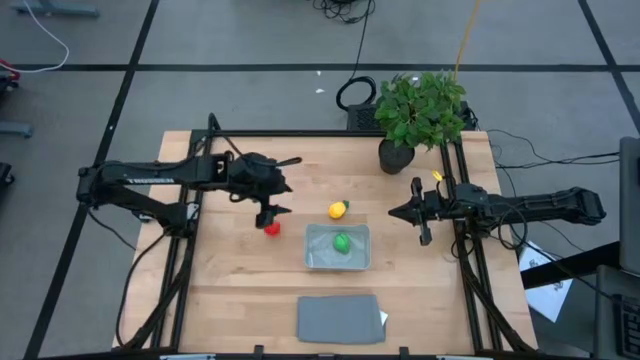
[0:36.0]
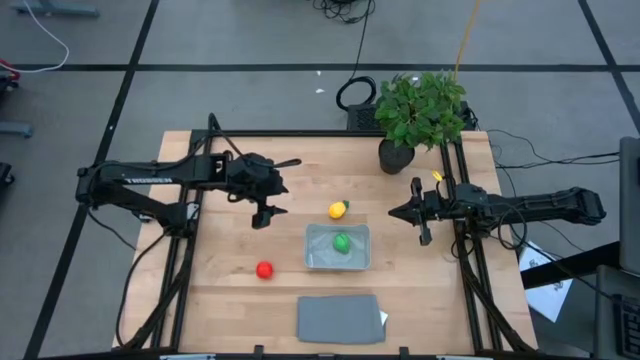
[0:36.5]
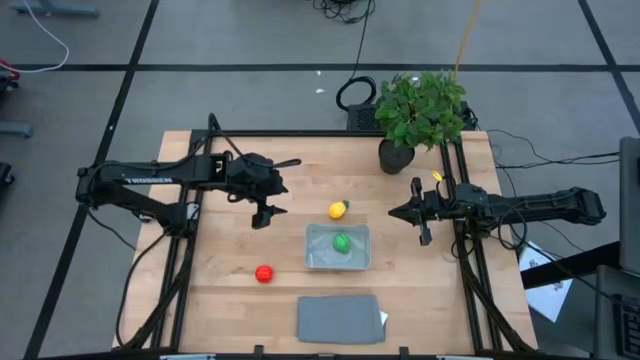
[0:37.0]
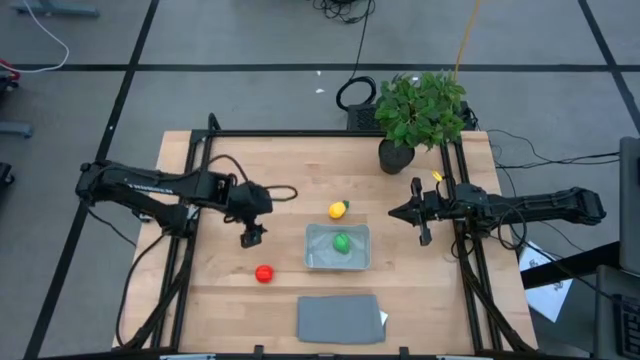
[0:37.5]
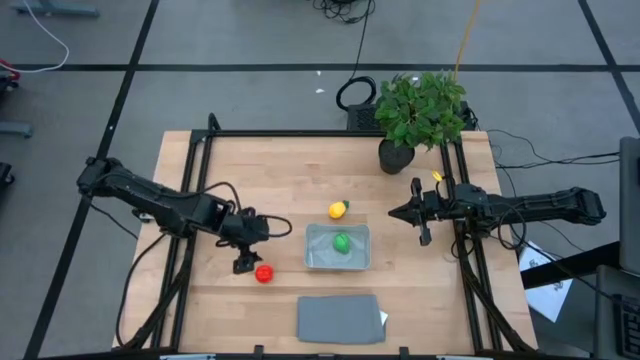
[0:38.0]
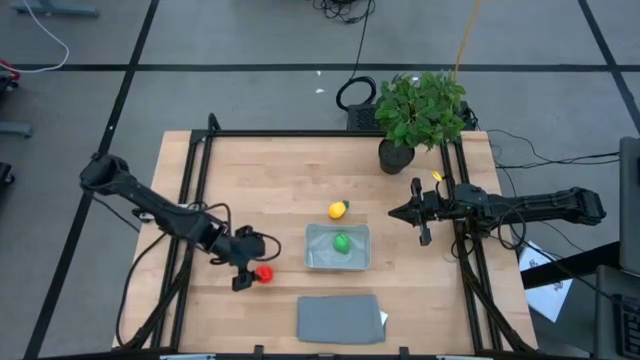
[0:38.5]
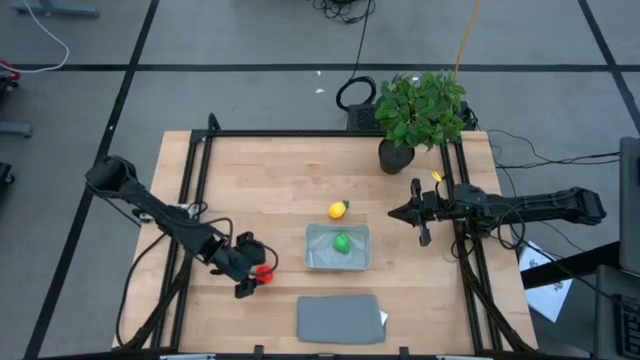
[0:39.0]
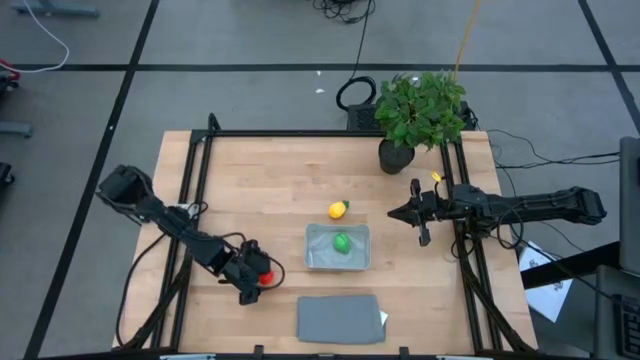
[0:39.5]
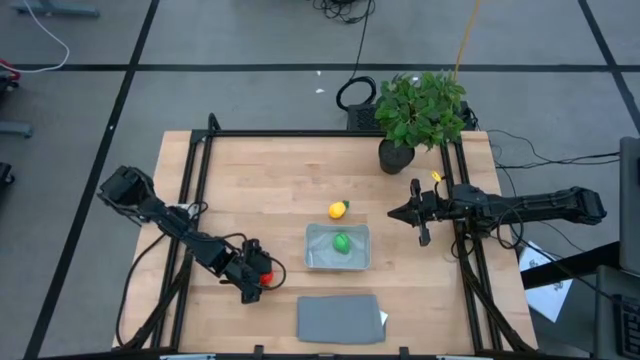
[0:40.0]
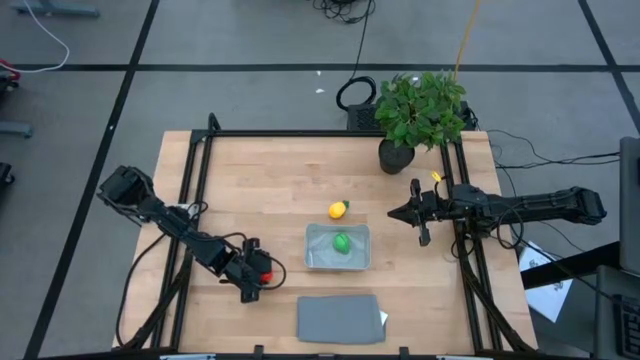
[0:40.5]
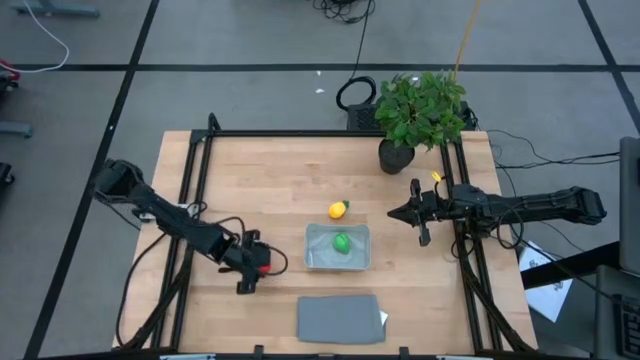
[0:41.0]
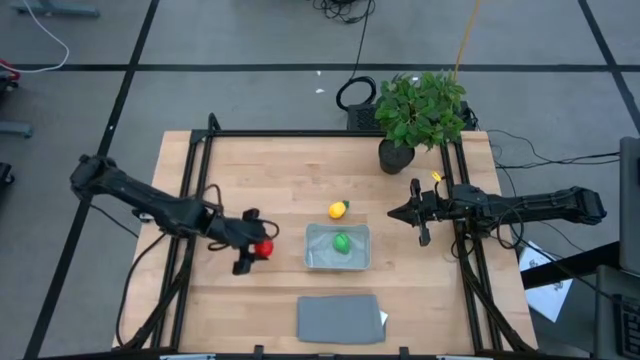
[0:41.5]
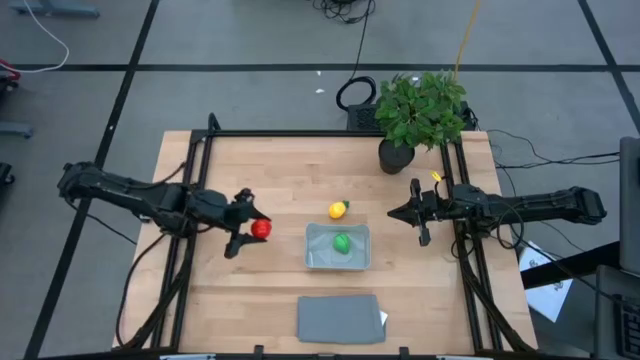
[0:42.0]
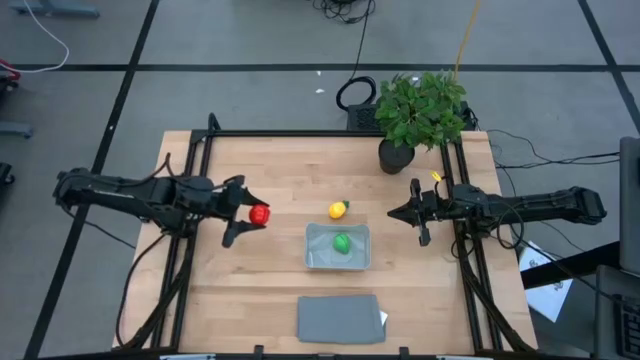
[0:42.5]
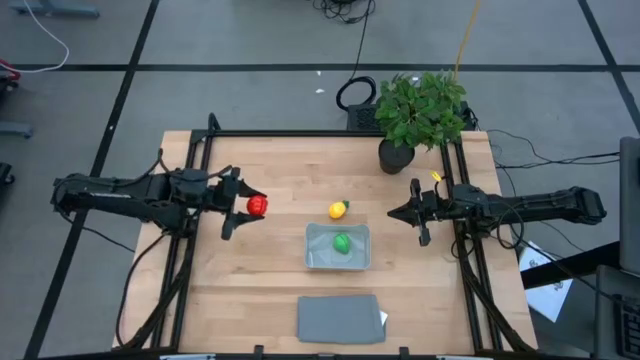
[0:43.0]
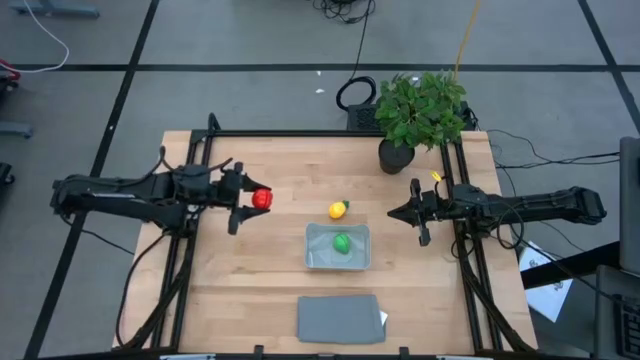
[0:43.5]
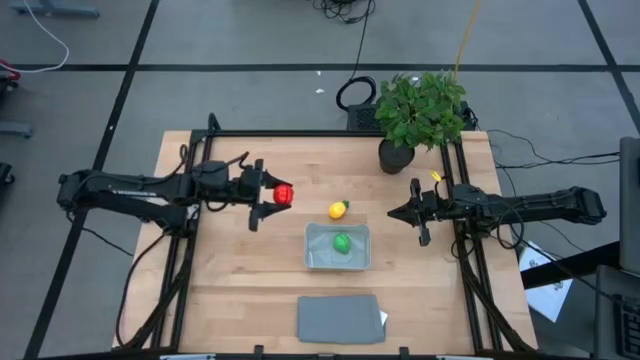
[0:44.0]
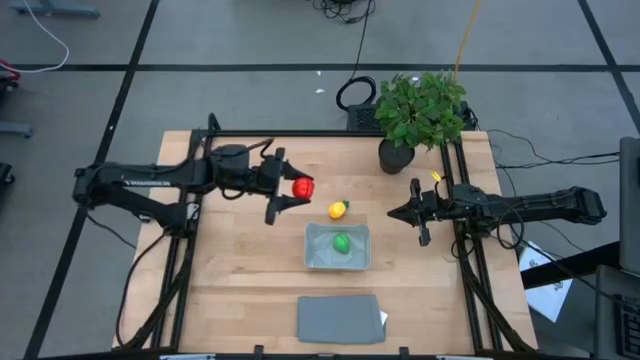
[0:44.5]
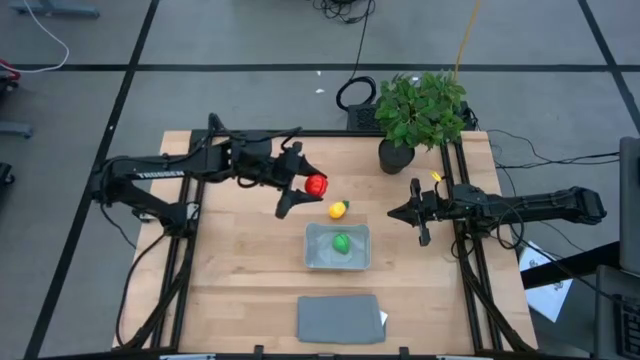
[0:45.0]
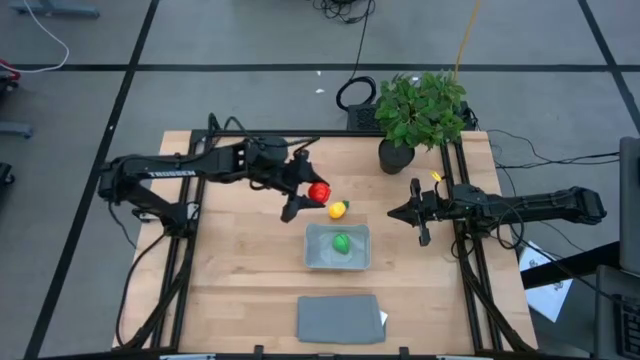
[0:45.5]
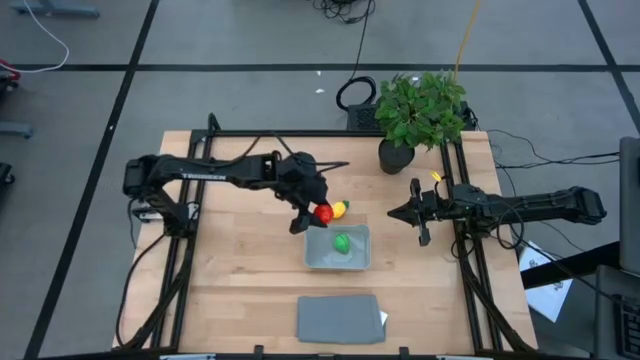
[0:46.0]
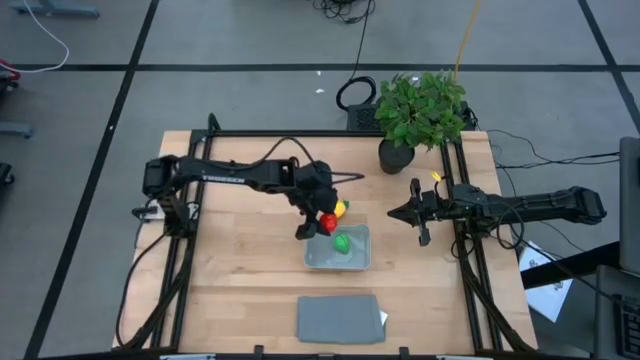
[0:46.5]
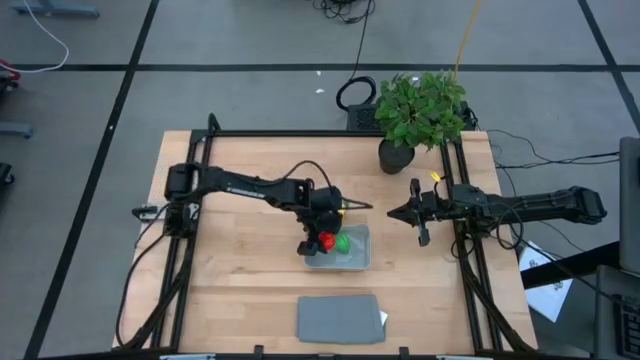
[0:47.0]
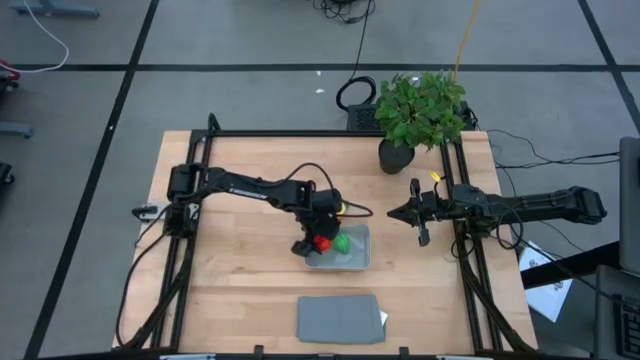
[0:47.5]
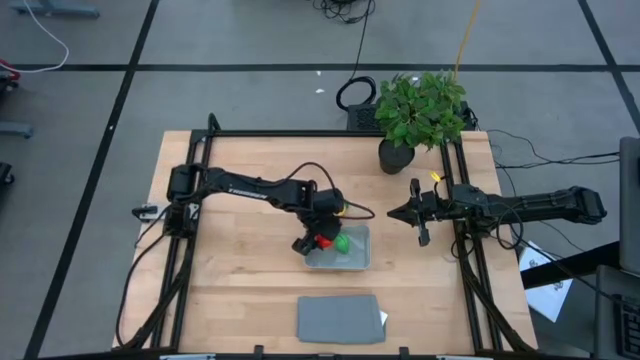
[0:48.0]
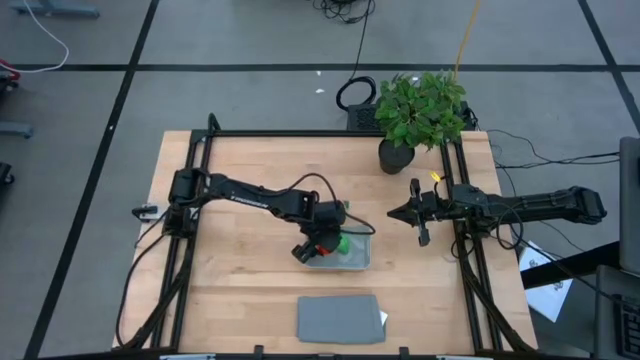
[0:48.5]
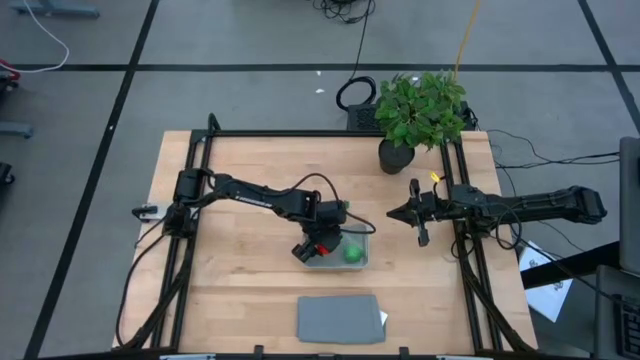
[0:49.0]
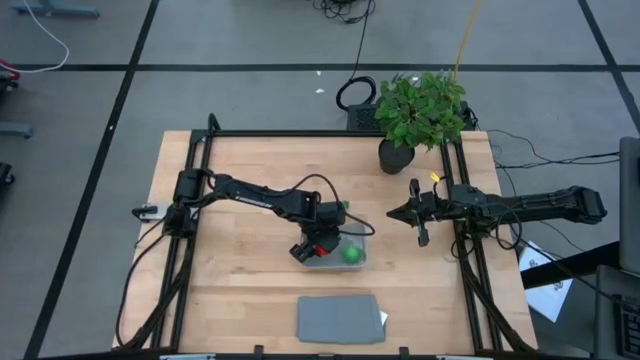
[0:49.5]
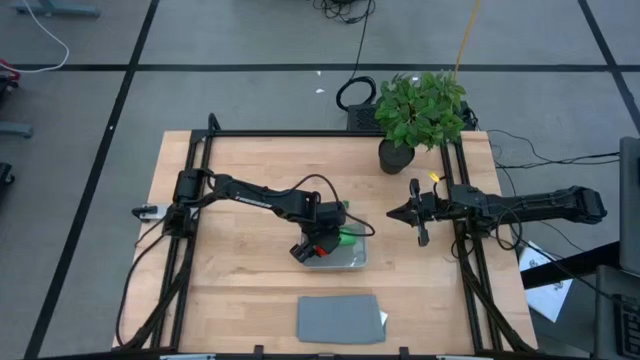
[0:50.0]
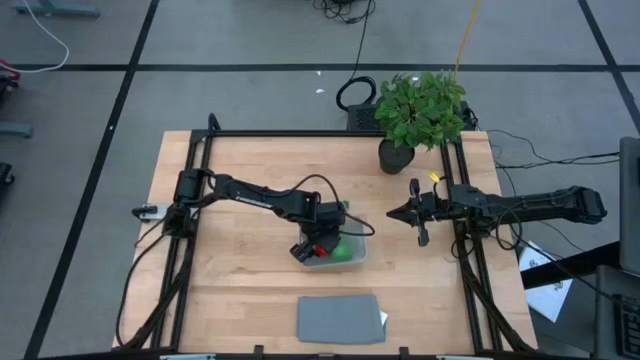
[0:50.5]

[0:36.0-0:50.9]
Task: Pick and placing Produce into tupperware
Put the tomato into the gray bin

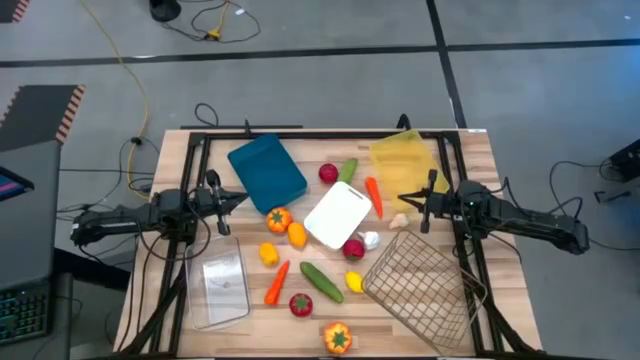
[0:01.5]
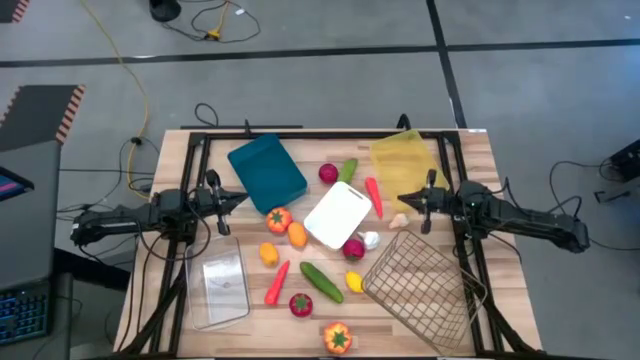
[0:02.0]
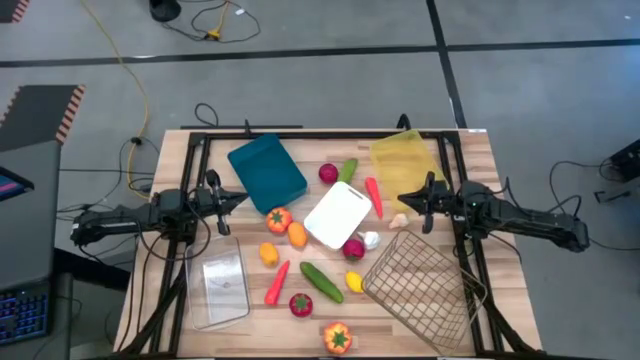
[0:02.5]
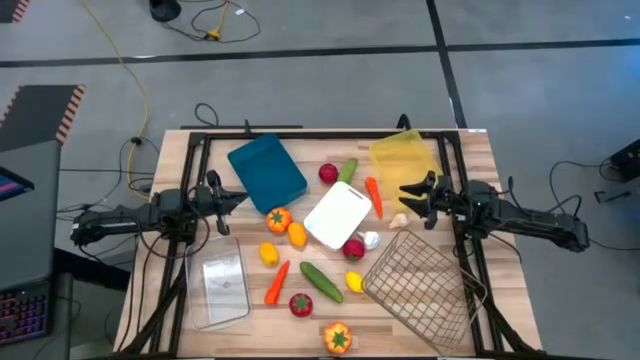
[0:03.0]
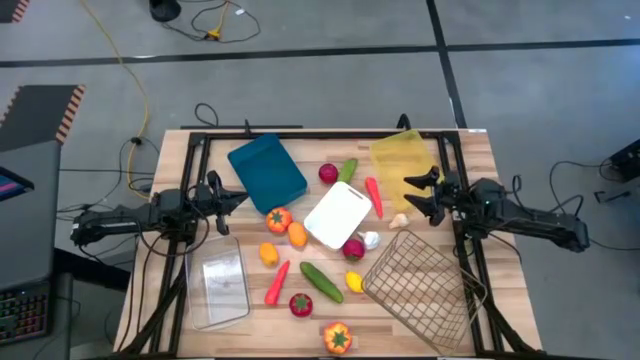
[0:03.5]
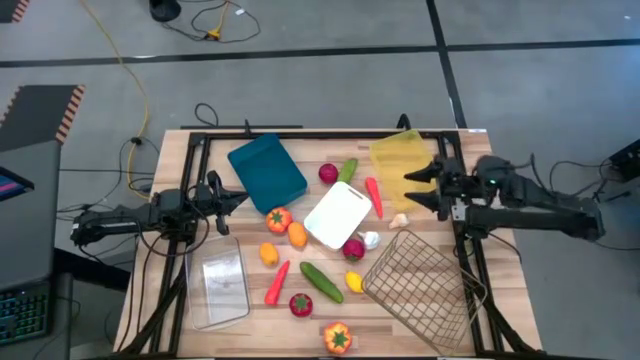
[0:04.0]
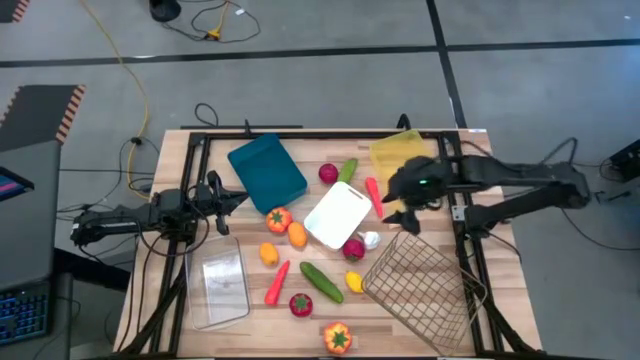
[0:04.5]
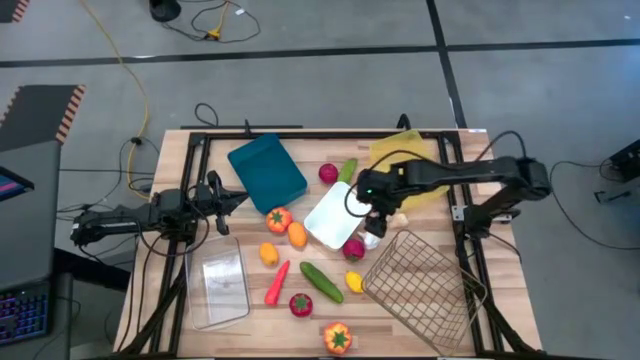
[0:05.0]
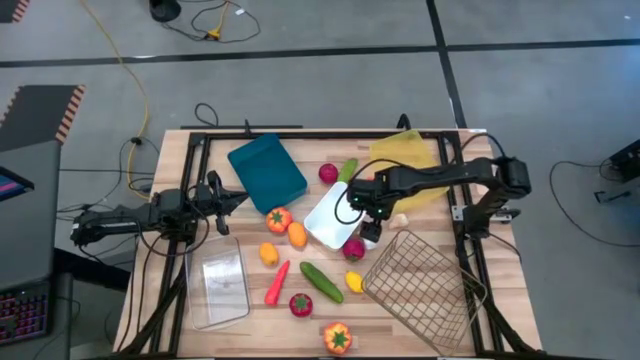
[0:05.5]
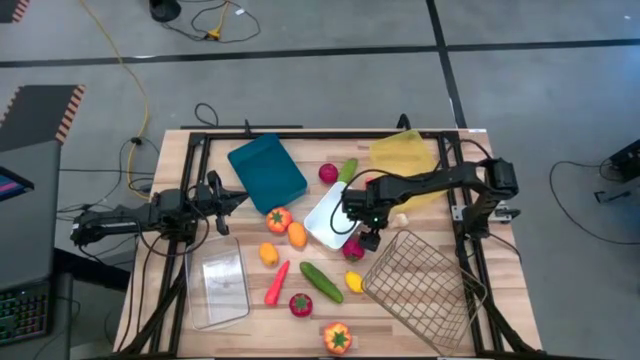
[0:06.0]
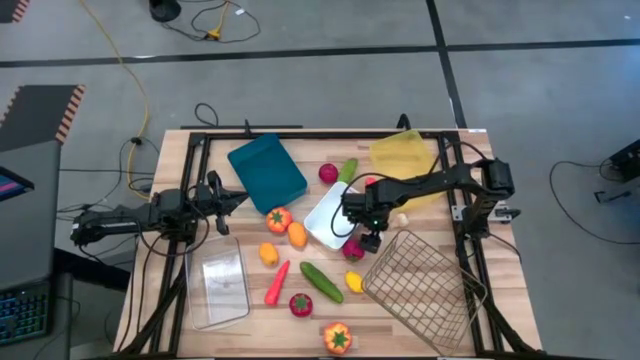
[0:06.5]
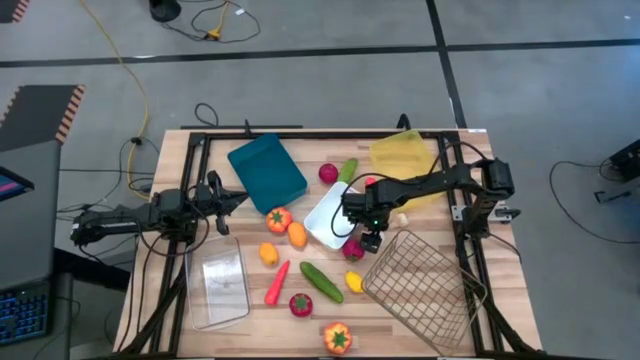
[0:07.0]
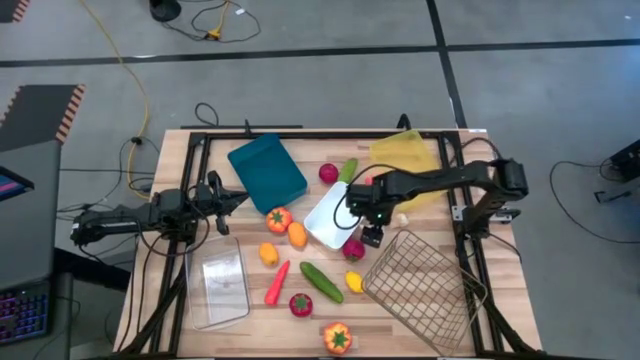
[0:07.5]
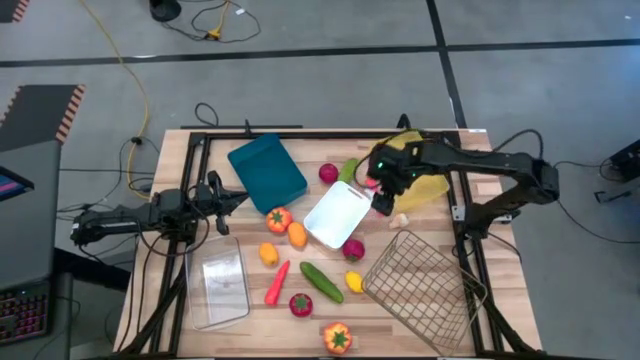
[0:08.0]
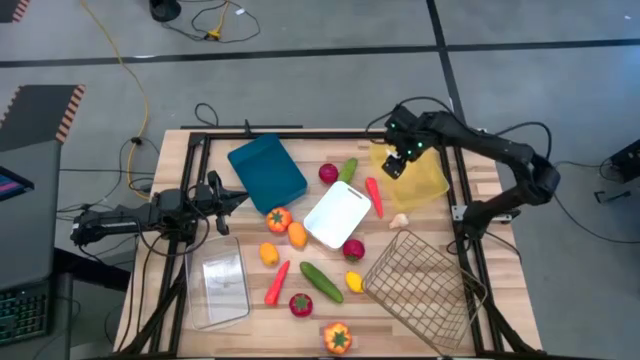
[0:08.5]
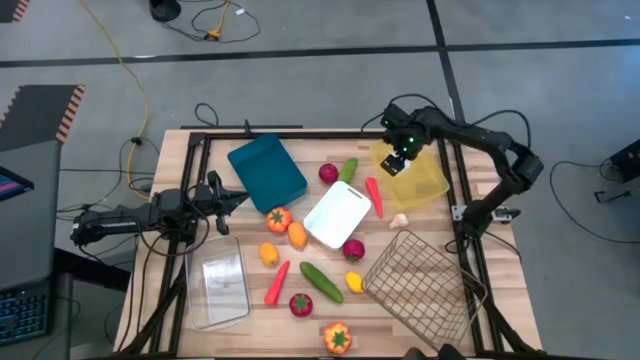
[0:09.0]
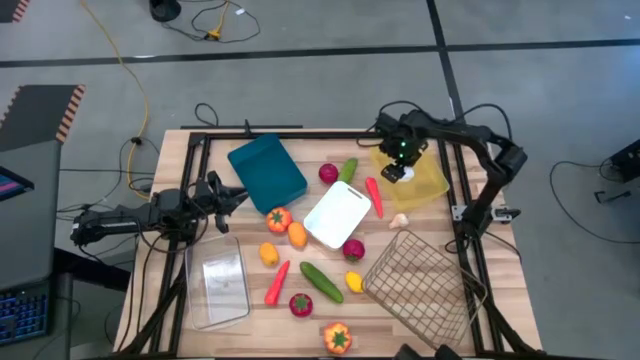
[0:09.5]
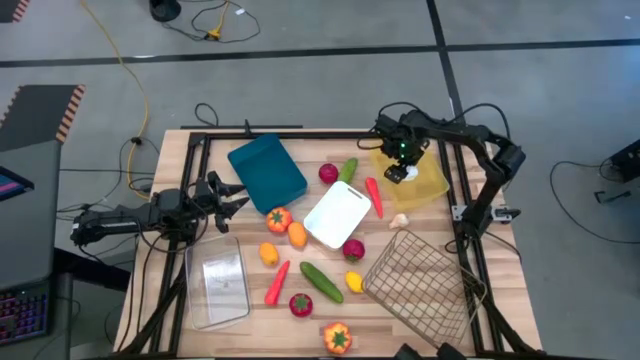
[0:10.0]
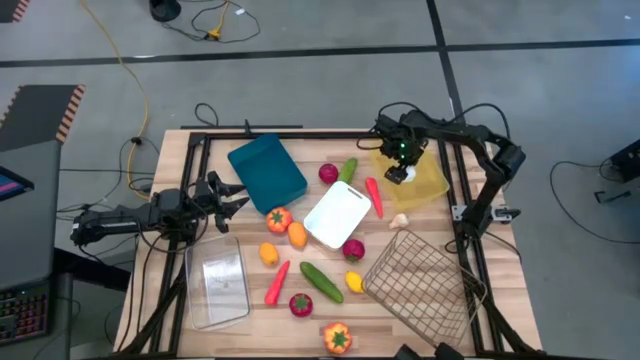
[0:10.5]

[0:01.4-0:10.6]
Task: Sort produce into baskets
Put the left white garlic into the yellow bin
